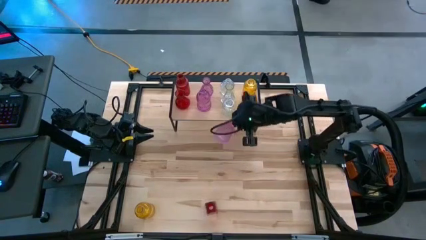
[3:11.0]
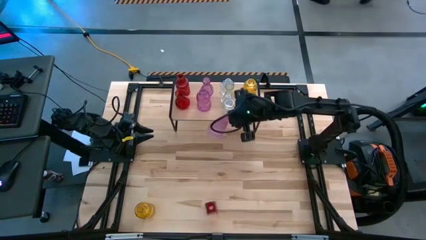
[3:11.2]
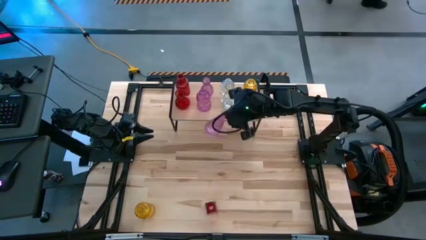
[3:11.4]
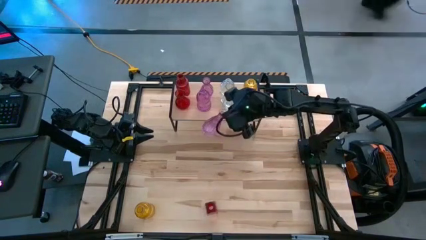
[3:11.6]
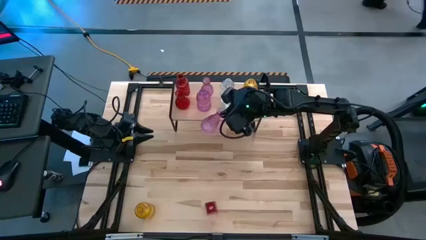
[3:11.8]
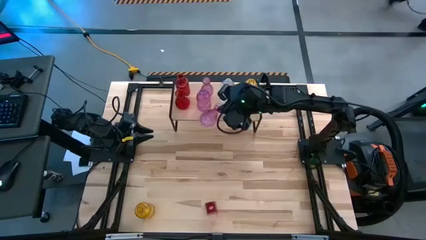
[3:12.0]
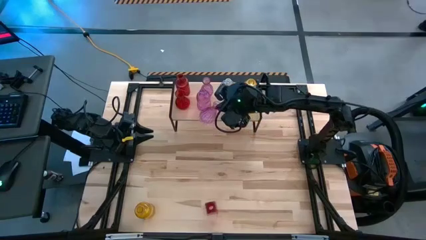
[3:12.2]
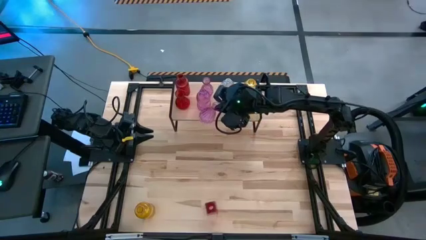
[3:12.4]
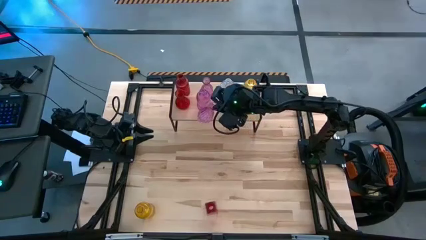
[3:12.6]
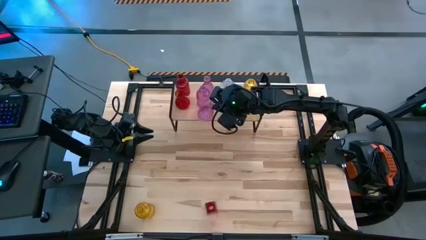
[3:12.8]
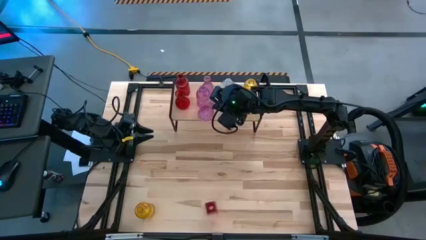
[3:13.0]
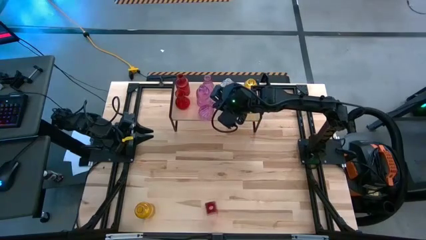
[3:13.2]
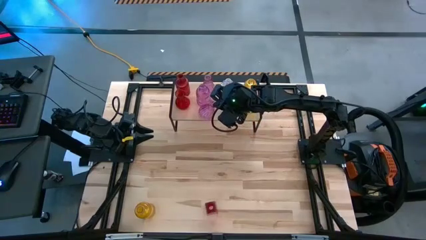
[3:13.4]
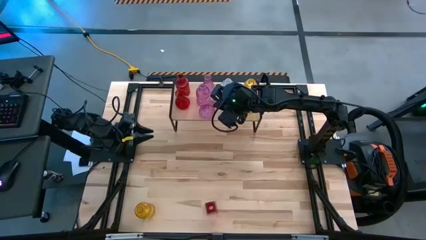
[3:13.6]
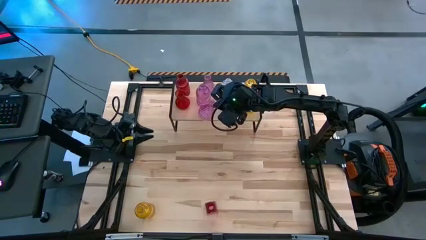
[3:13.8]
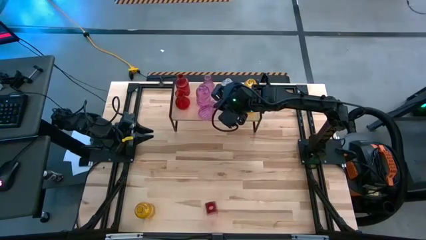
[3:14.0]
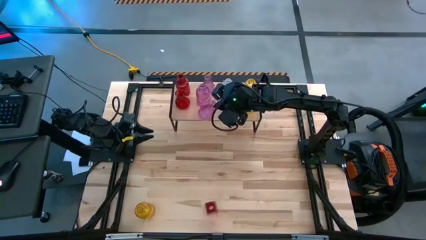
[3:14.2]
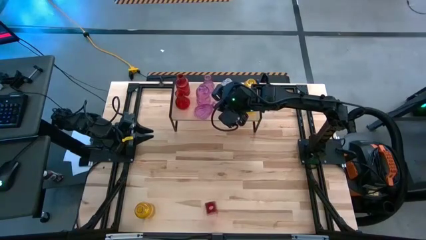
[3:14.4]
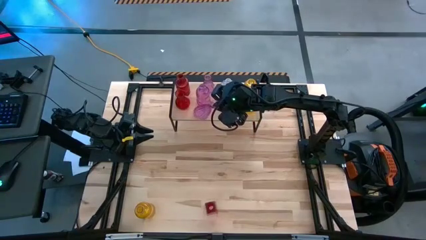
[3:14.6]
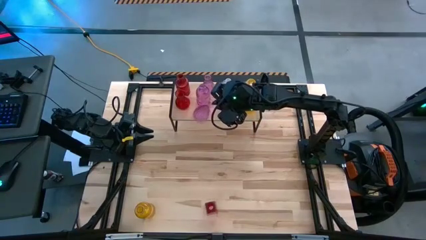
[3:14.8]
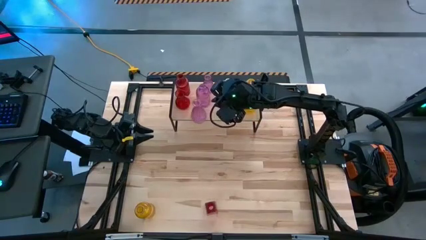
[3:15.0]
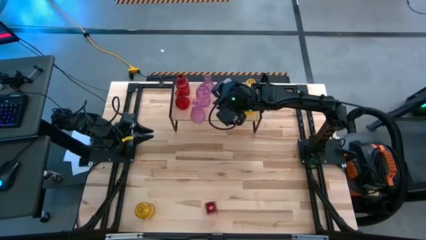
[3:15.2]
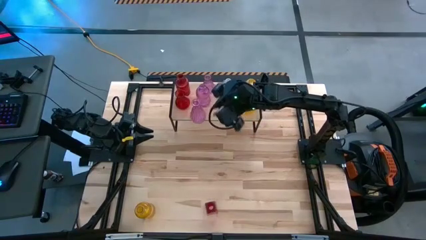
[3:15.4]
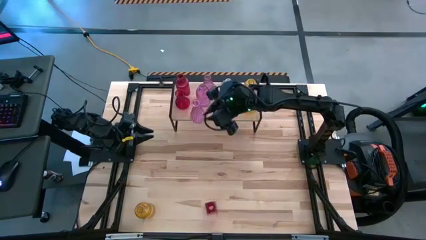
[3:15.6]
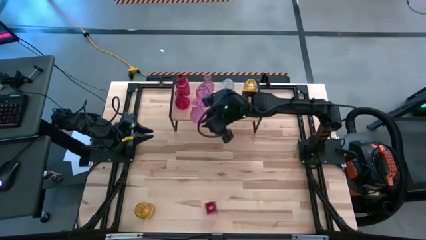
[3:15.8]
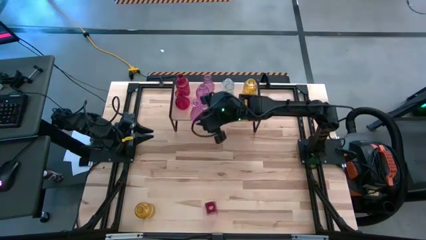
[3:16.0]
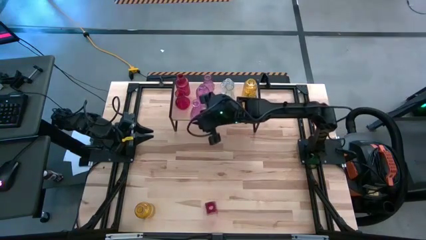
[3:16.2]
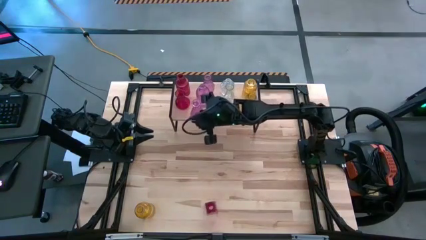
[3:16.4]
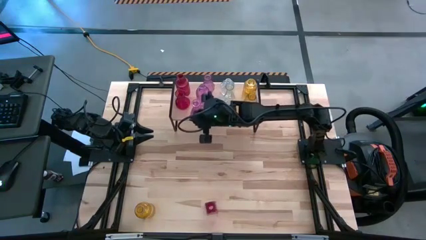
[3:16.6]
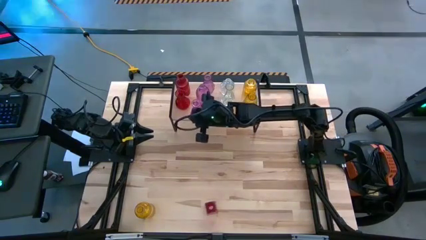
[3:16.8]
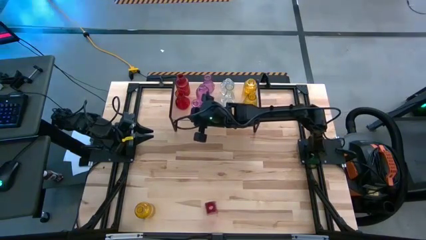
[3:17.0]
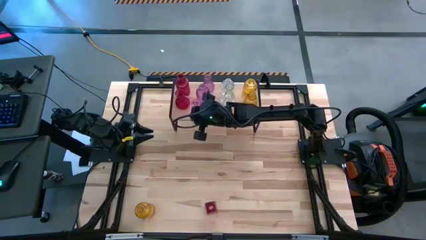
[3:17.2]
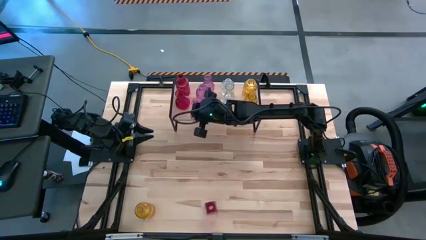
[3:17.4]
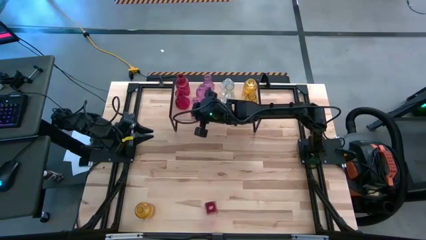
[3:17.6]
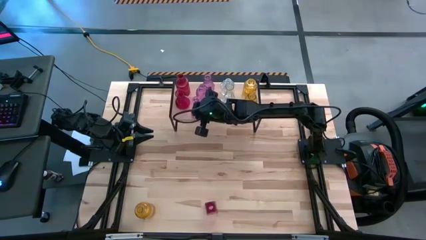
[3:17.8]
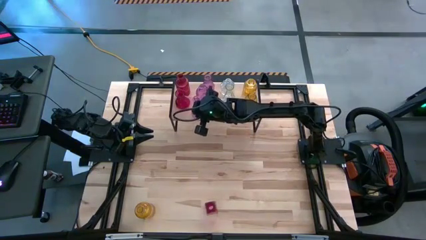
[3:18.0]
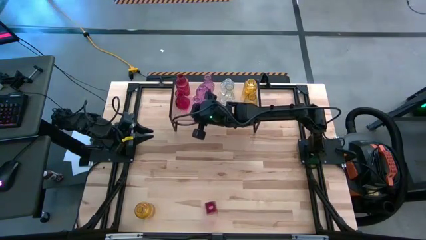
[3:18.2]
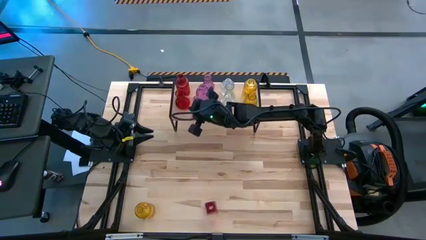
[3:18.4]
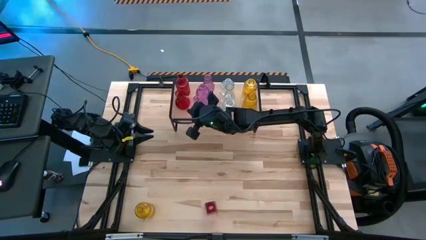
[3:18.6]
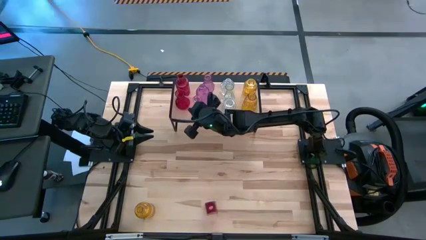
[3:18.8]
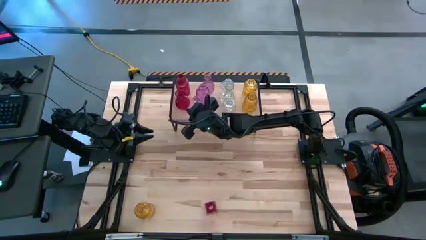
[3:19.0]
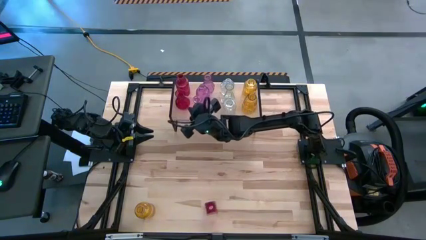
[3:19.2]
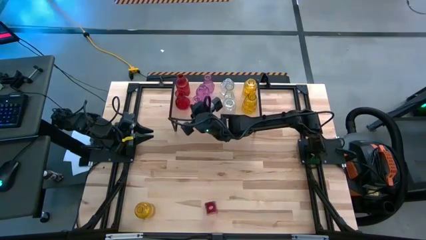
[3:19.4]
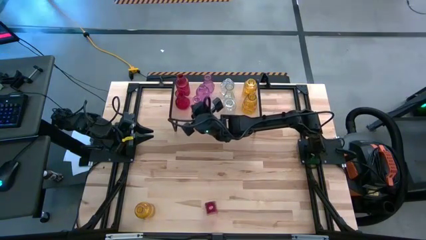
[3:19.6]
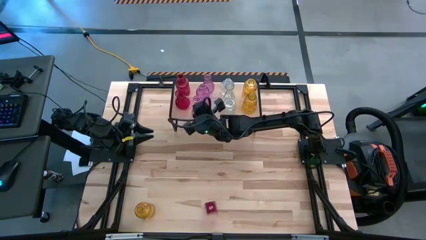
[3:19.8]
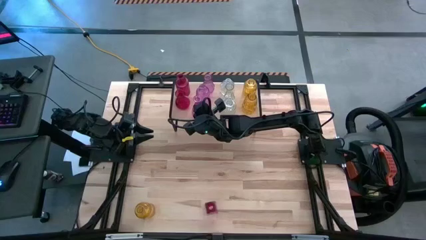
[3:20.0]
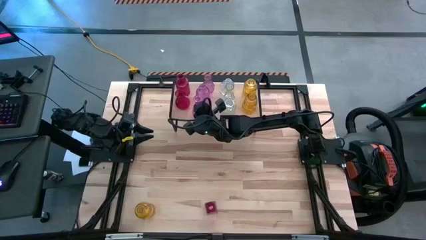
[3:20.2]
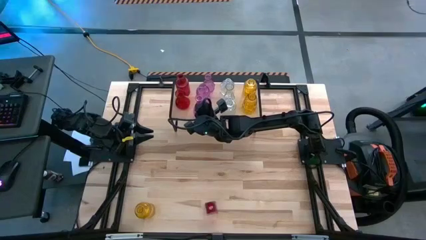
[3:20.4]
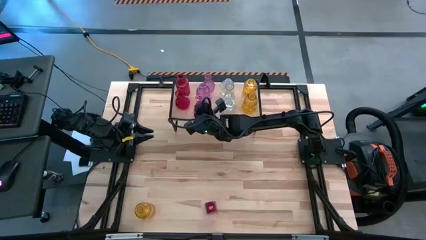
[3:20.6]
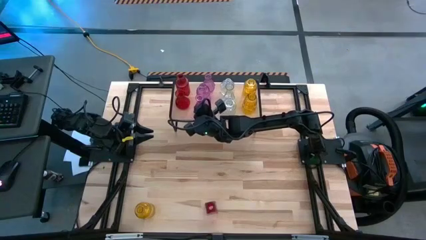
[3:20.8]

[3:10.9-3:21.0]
Task: sort vases onto shelf
Put the pink vase on the shelf aligned with the other pink vases
